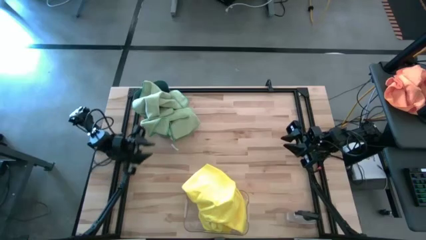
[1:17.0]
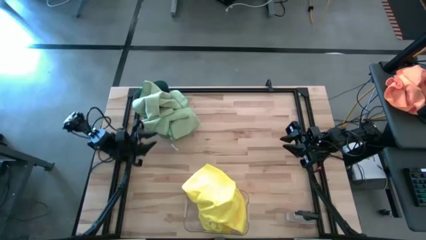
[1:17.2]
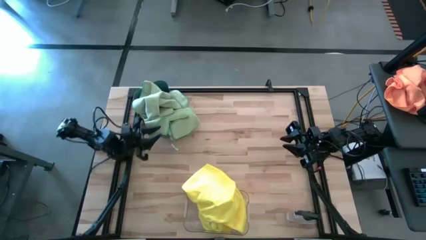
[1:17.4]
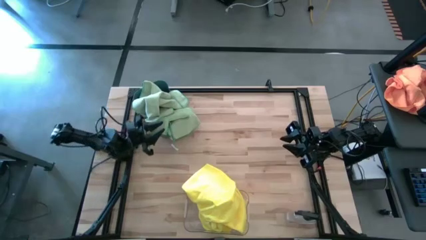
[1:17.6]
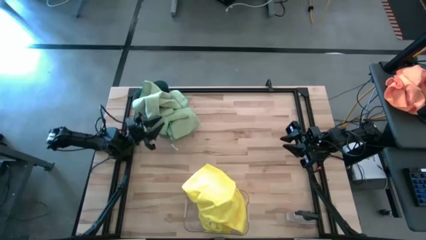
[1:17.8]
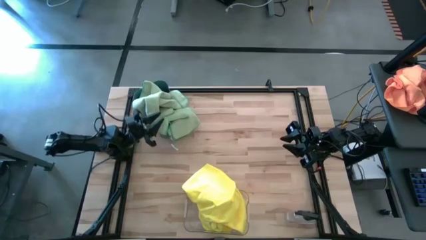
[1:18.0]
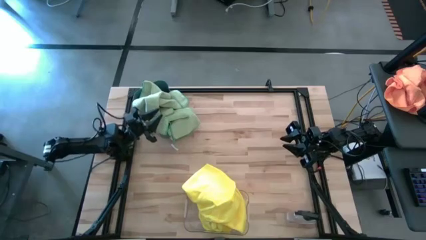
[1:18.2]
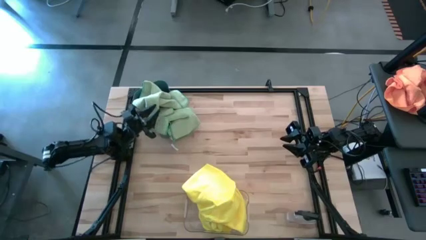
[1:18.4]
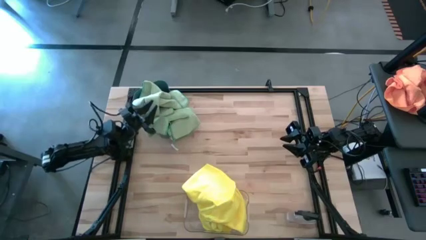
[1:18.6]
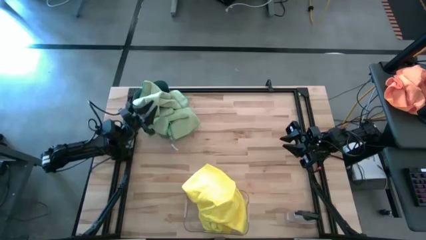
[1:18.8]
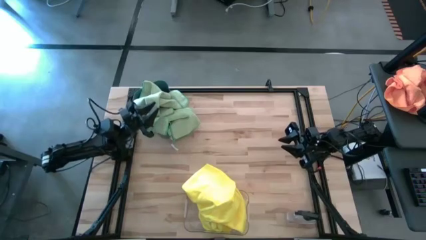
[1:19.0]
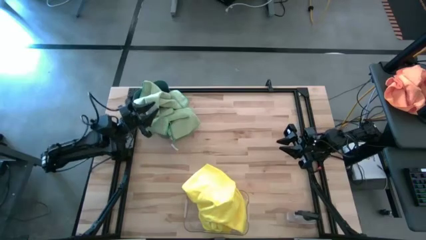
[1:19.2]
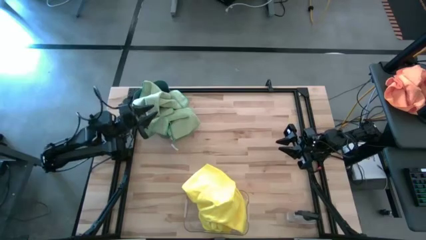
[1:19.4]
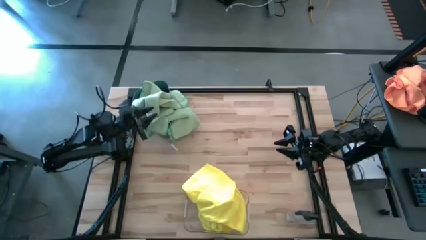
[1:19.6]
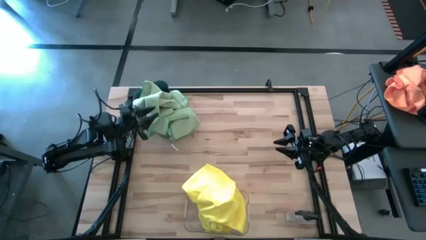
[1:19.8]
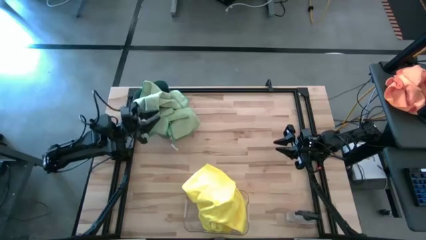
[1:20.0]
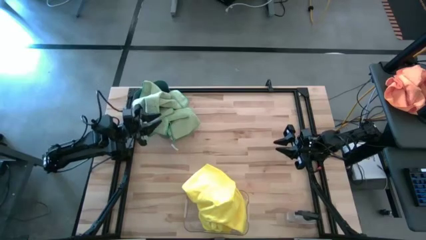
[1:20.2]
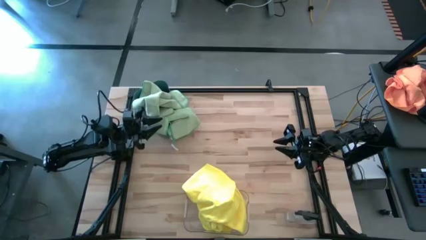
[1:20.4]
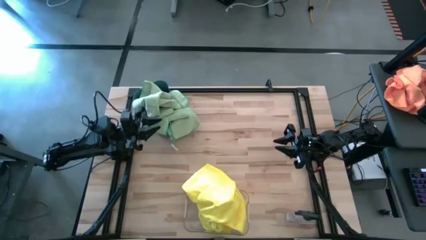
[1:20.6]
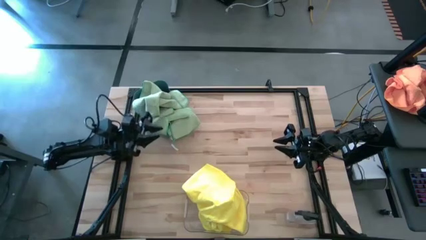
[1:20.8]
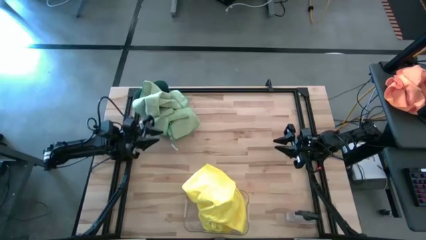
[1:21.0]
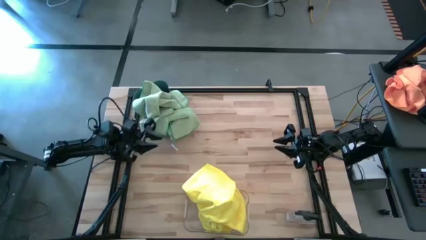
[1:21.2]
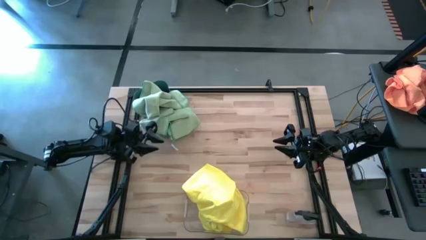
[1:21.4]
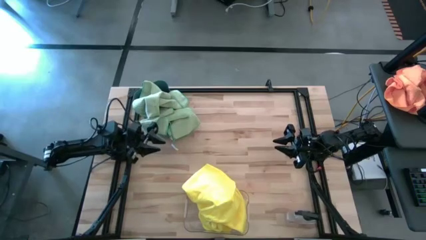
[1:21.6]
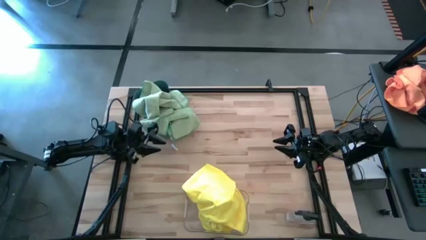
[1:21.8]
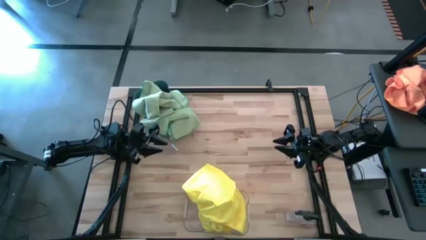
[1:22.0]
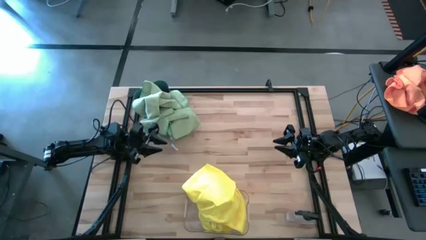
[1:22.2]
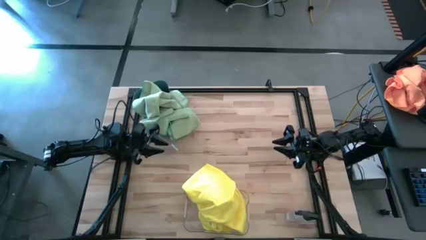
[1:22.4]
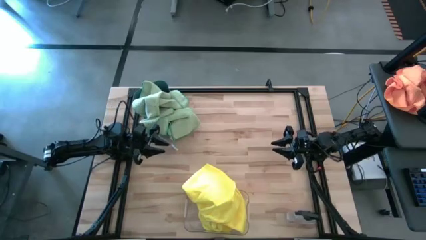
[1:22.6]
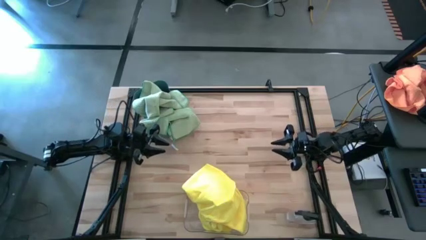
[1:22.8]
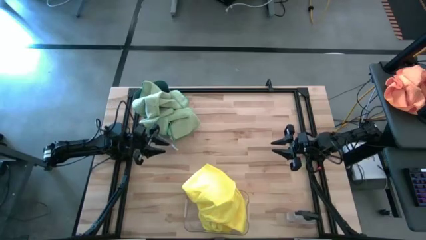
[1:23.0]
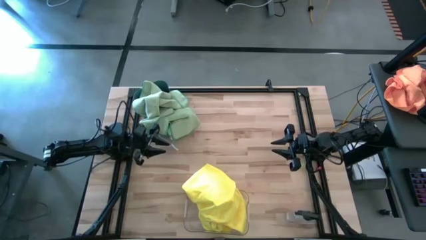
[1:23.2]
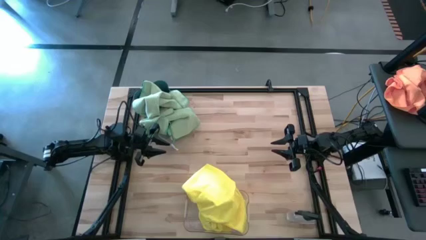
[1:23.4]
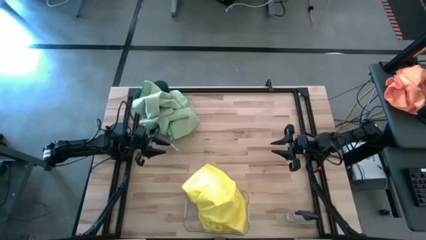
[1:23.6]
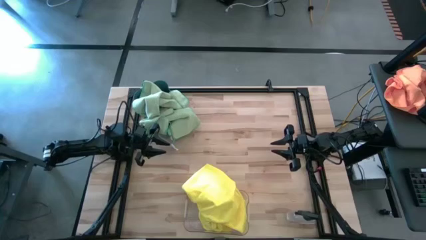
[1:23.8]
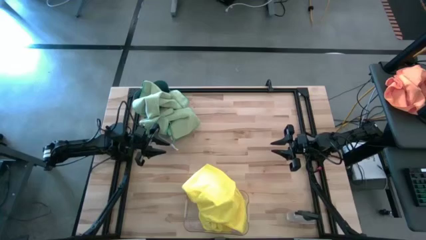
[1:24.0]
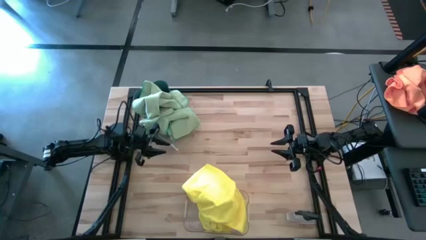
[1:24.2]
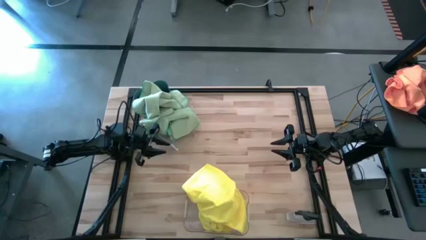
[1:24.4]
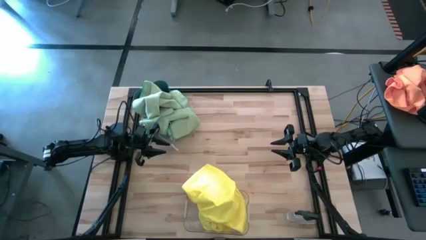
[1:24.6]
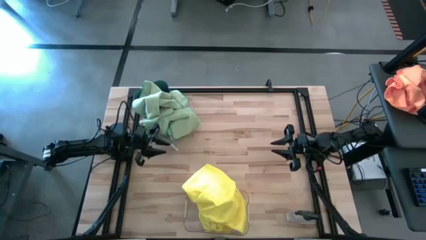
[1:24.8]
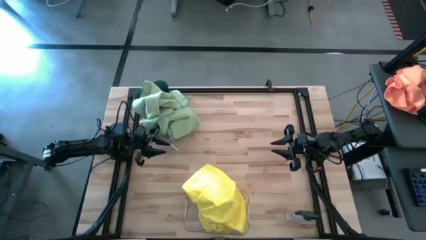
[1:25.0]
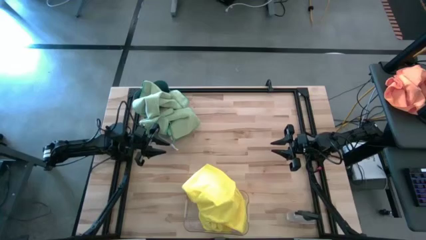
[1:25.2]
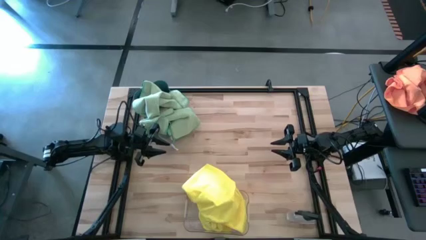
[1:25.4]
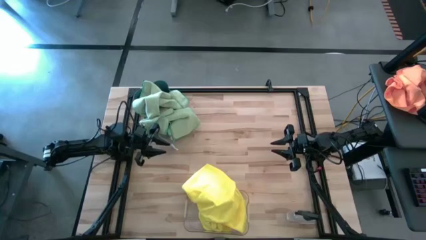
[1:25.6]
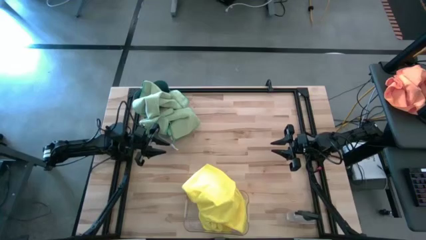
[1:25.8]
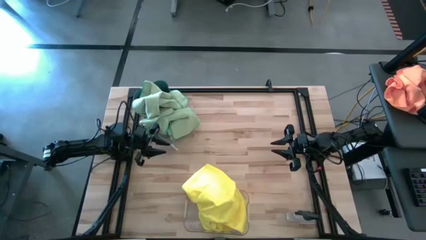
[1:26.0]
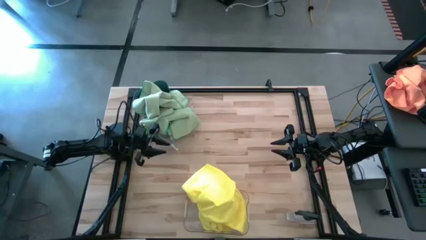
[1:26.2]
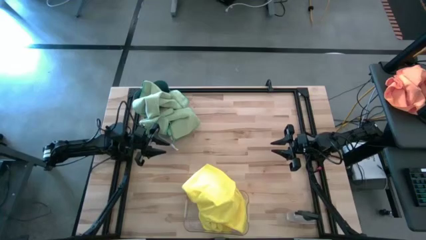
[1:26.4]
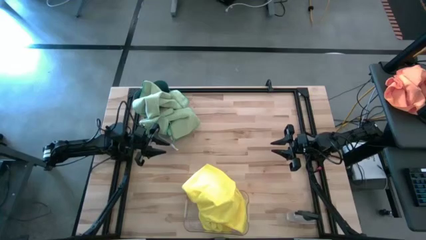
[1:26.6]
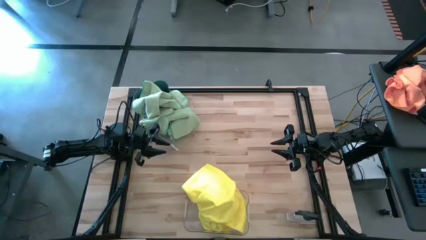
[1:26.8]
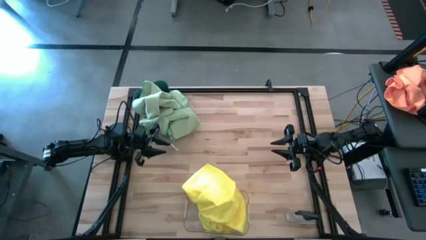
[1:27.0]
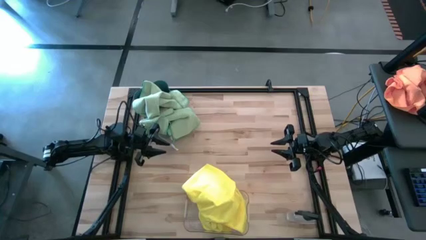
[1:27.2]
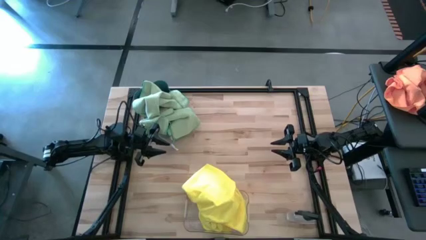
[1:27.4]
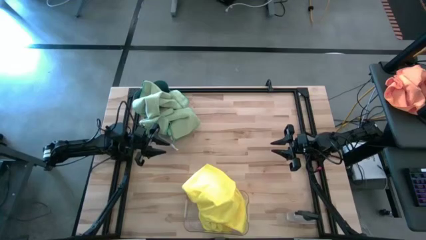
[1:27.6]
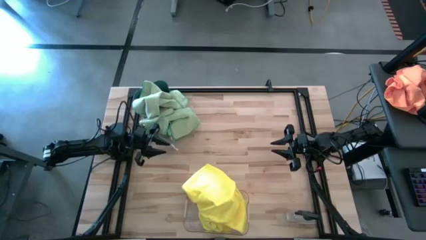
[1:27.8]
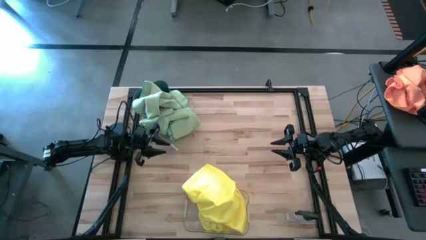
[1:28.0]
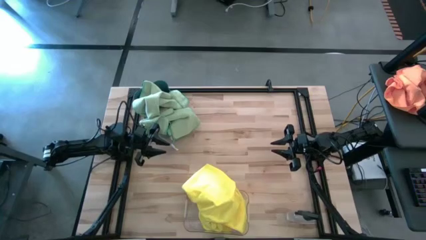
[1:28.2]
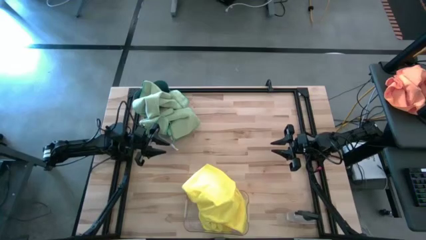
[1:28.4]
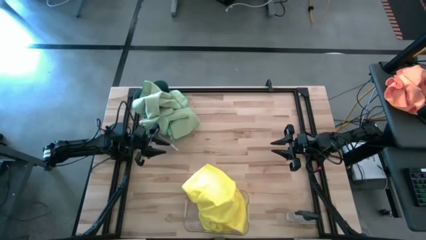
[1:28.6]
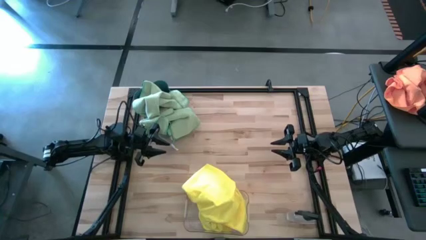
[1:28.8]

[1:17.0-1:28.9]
Task: Sort microfiber towel by color & place in baskets
Return to Home Position

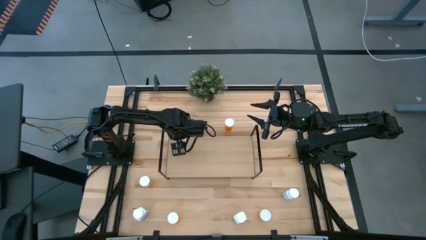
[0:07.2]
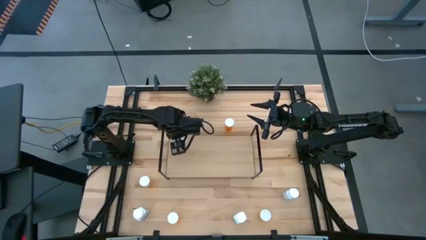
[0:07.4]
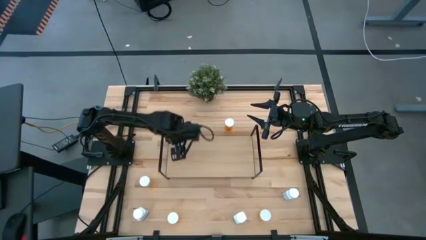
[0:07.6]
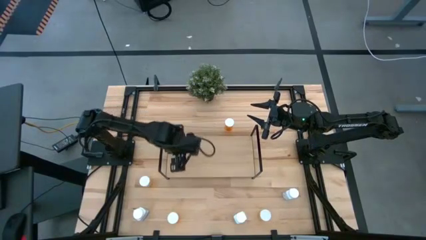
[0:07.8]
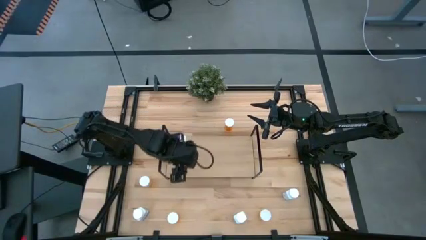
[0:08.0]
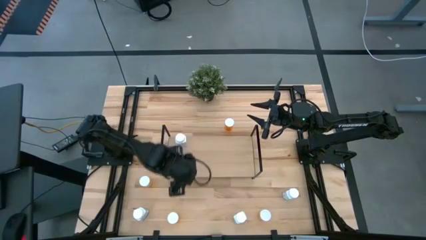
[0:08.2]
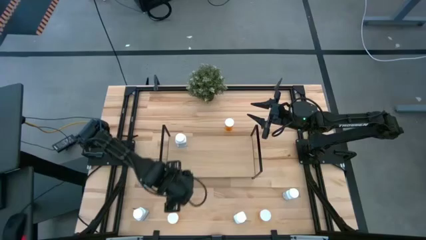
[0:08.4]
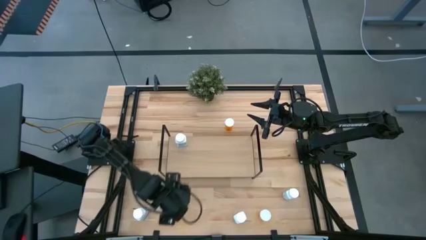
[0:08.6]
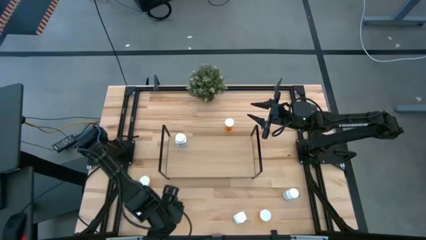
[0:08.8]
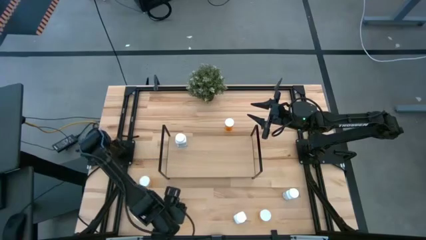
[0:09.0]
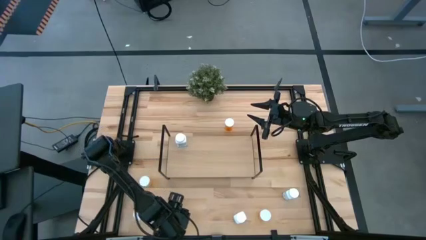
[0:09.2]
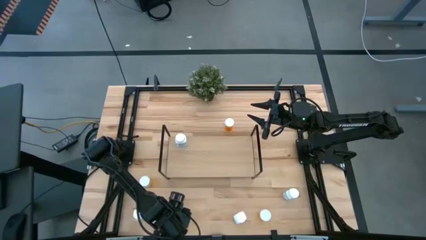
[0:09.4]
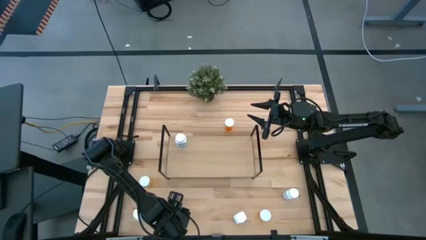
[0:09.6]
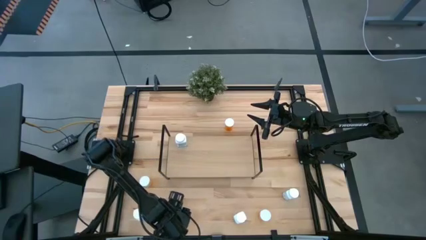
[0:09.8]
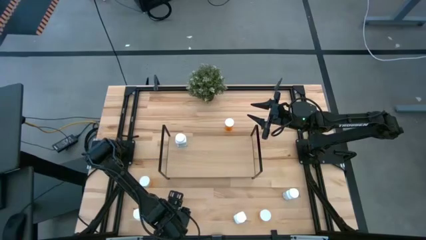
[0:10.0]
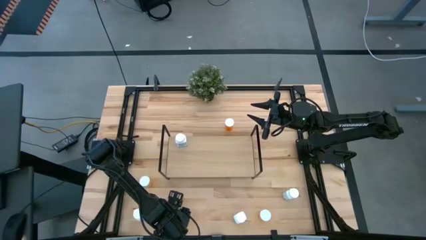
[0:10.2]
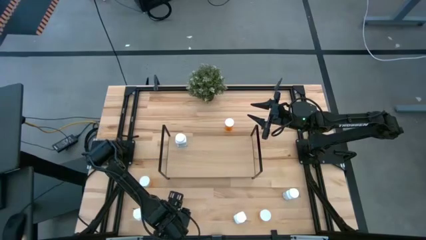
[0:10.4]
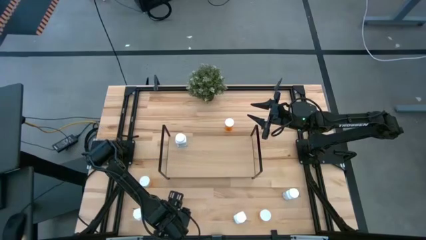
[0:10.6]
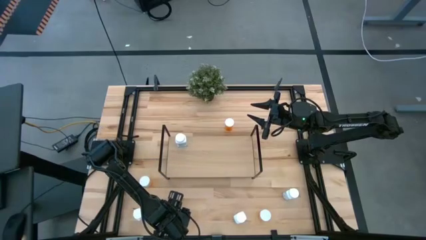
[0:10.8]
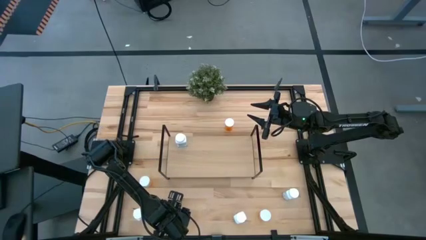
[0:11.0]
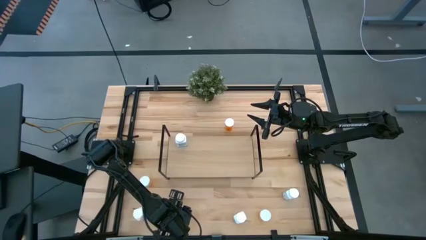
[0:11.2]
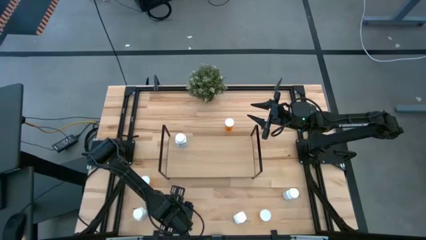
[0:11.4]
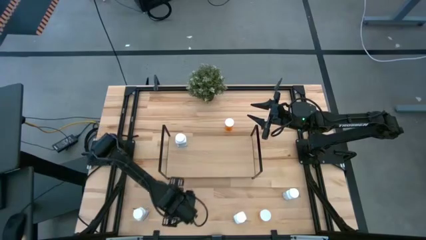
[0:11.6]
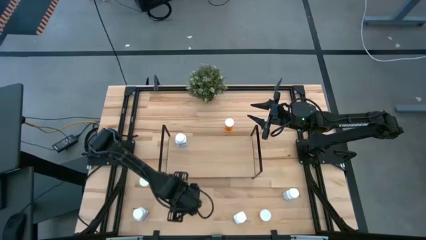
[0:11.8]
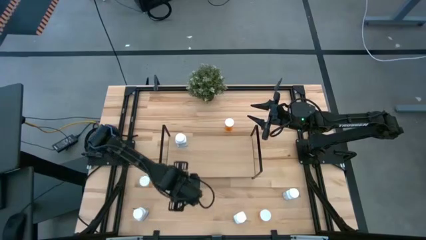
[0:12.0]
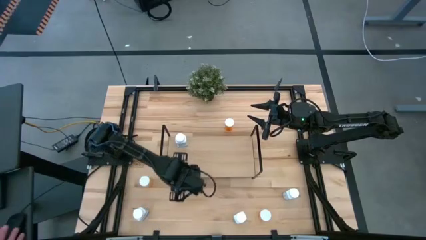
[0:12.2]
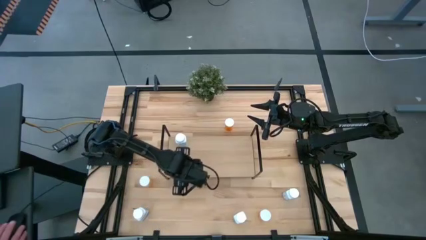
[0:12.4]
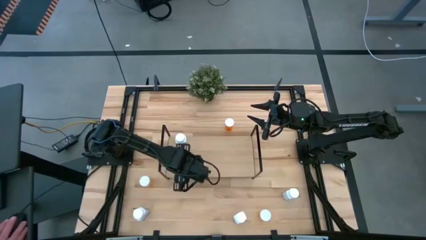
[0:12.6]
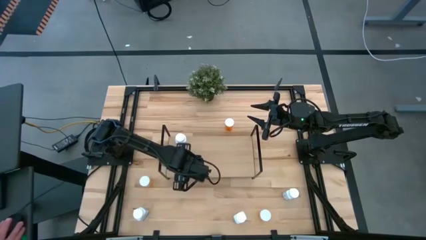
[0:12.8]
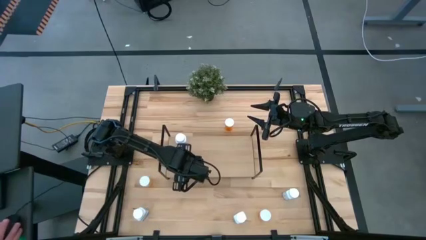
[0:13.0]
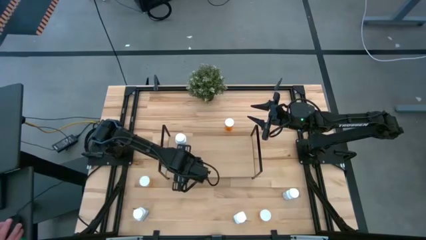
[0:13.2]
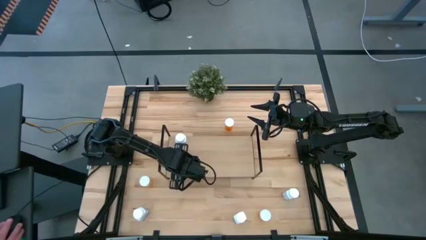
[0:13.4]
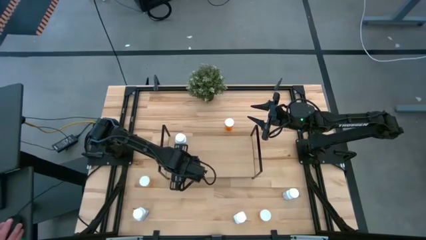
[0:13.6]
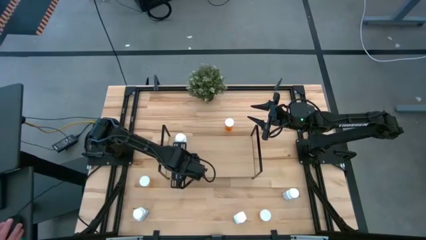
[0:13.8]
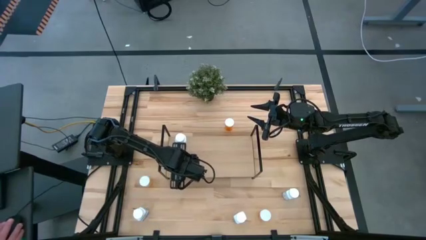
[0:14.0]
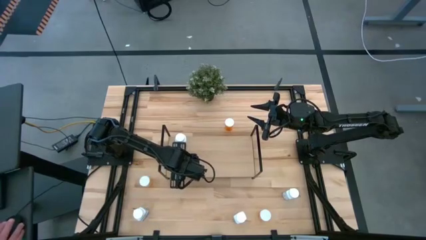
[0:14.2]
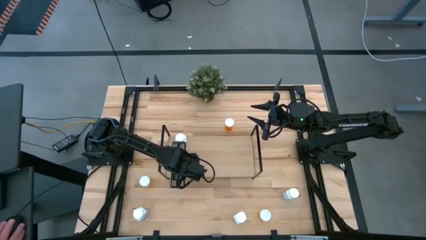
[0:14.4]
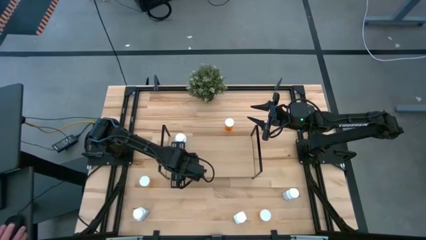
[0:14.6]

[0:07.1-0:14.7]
Task: Pick and place medicine bottles onto shelf by color
Put the bottom left orange pill bottle on the shelf
